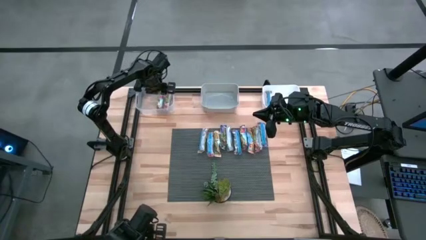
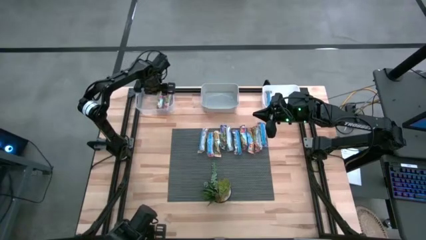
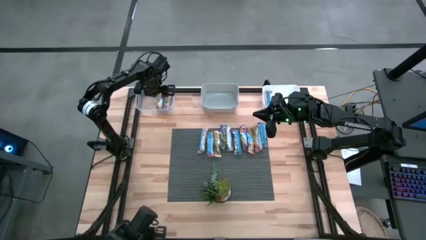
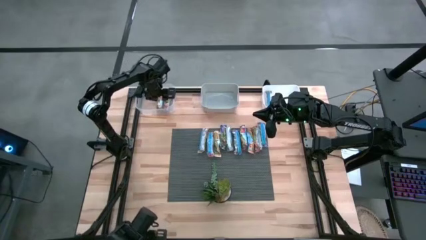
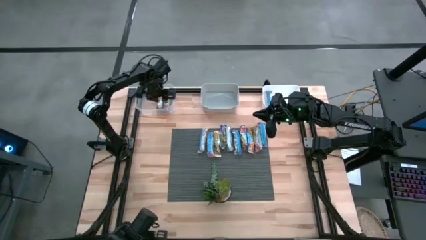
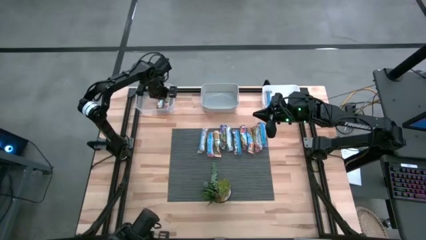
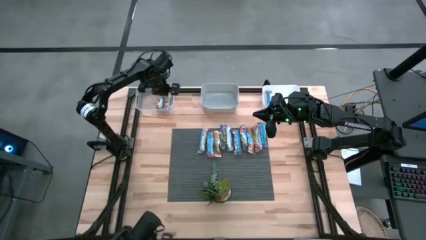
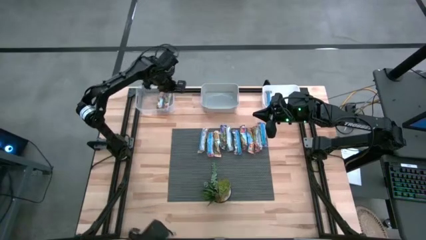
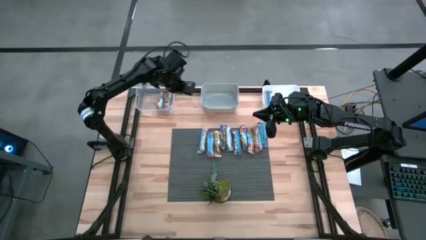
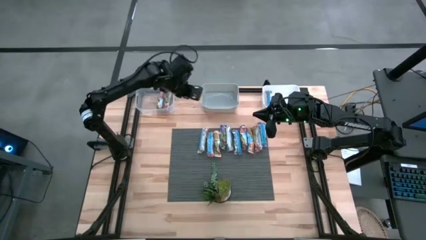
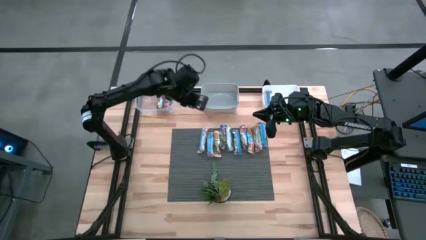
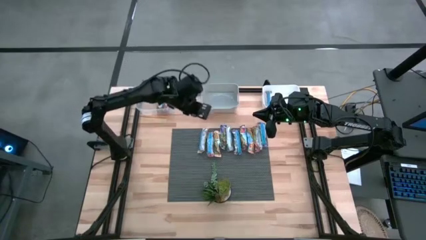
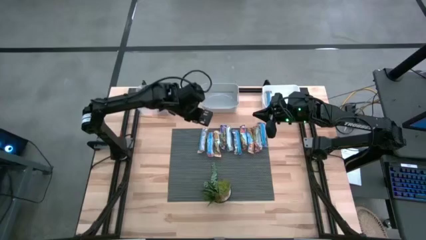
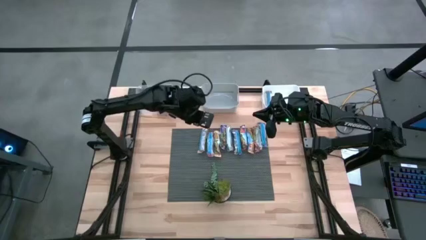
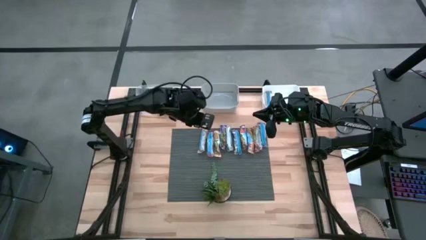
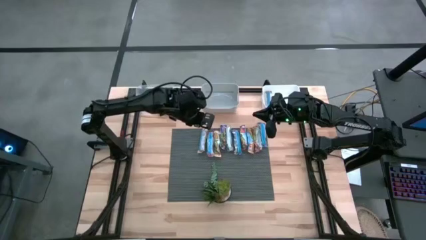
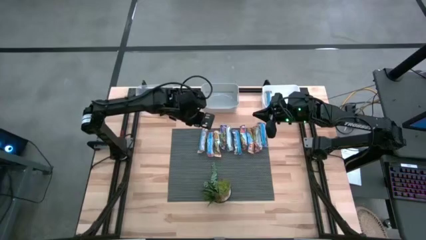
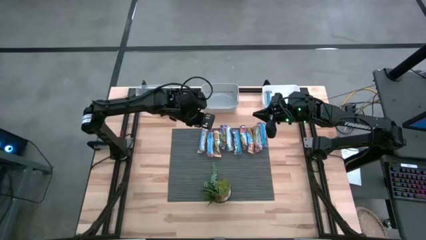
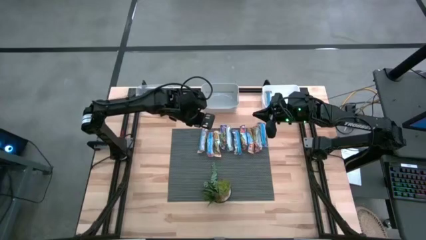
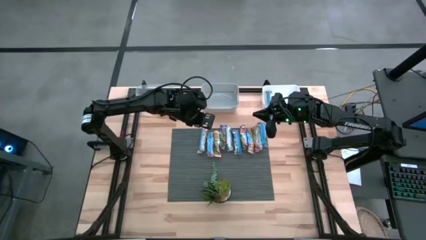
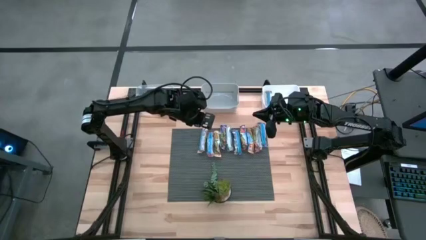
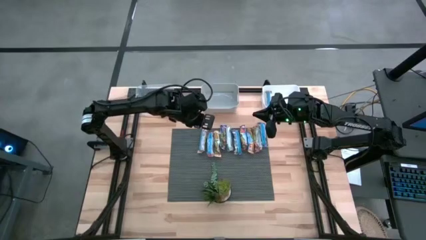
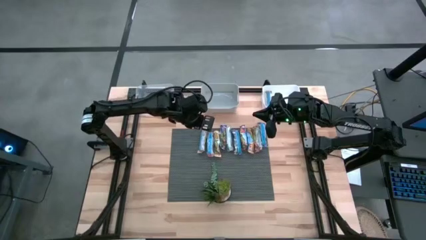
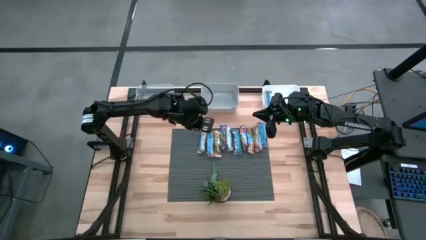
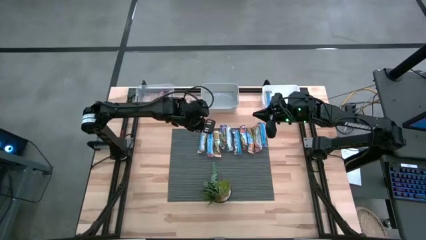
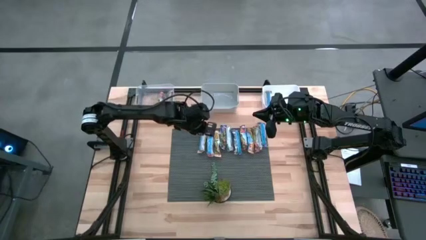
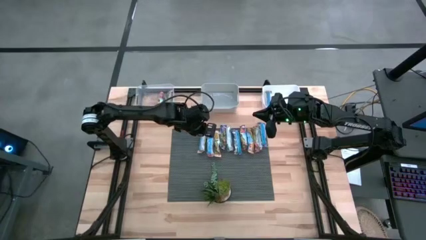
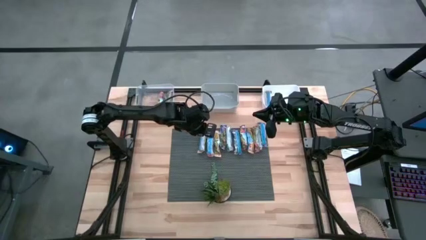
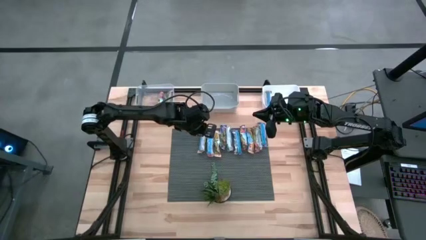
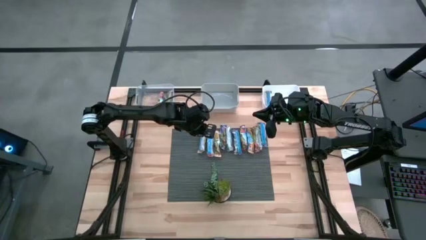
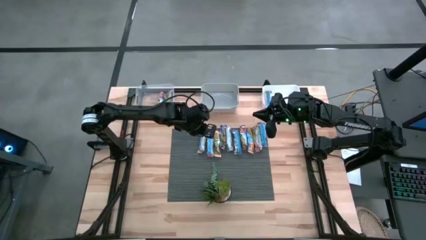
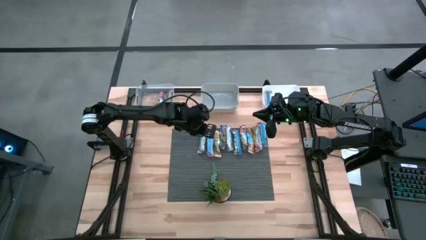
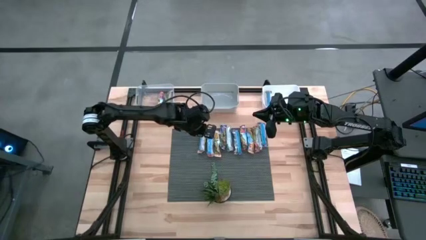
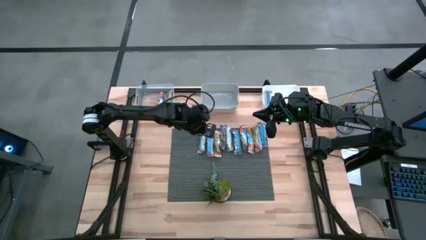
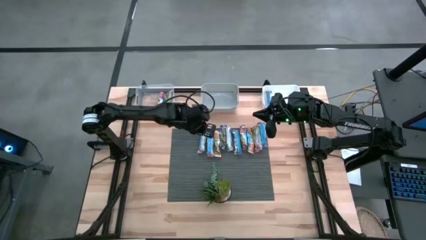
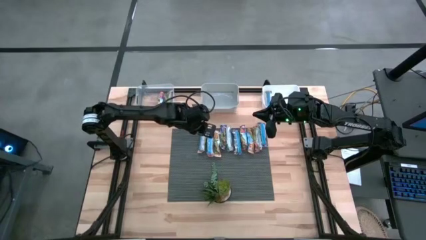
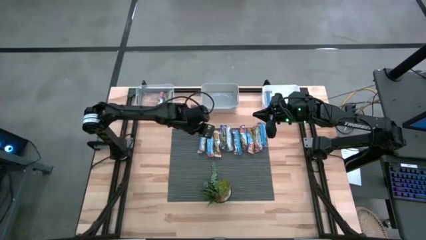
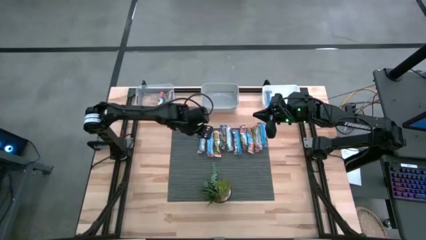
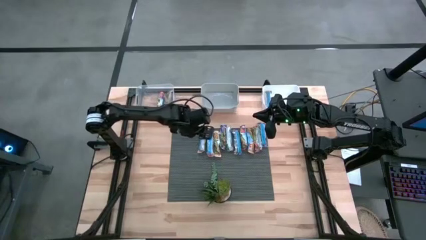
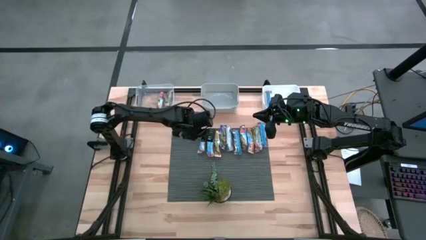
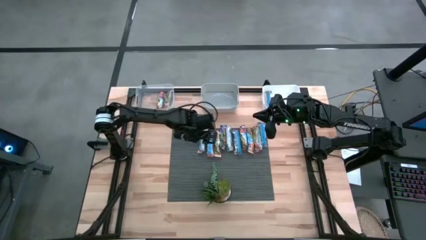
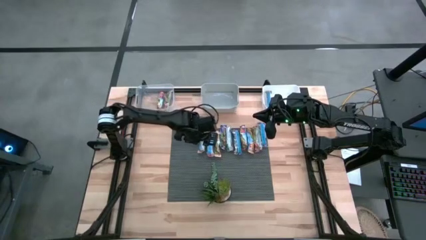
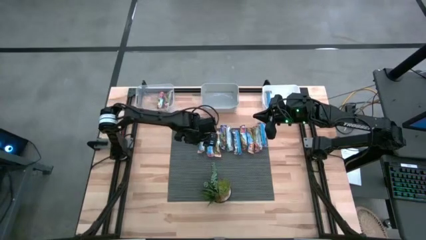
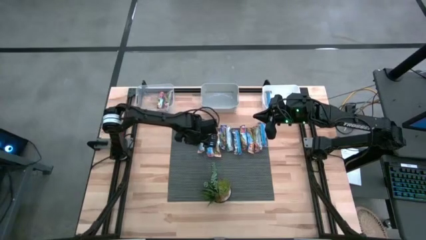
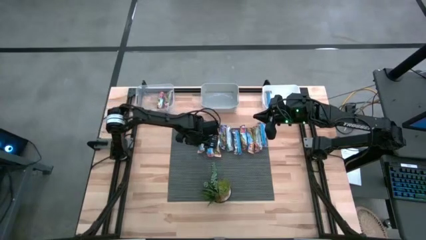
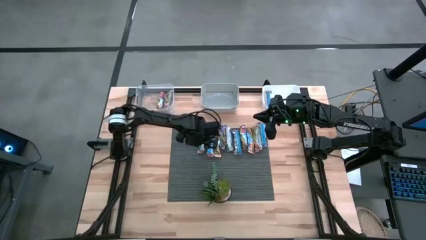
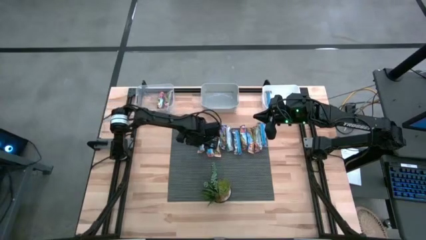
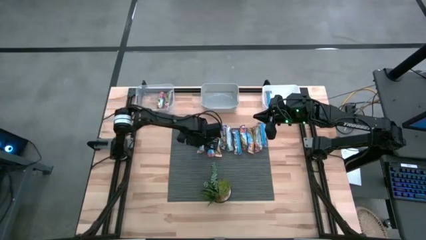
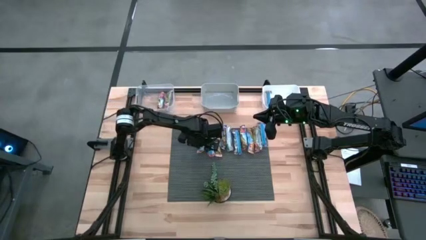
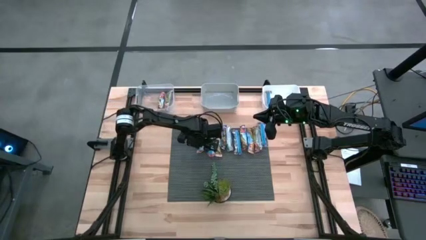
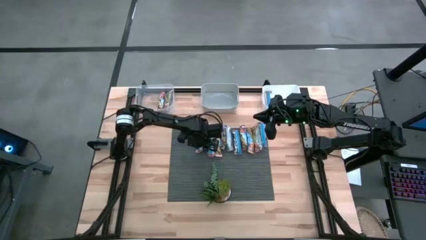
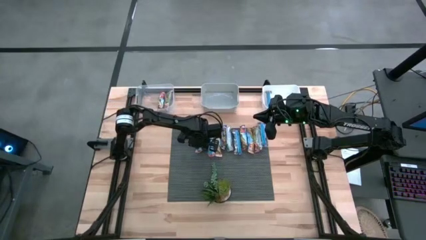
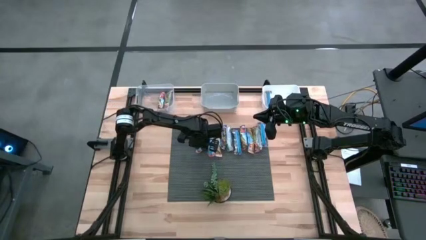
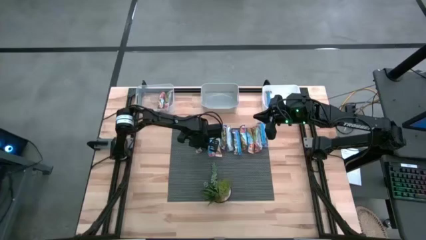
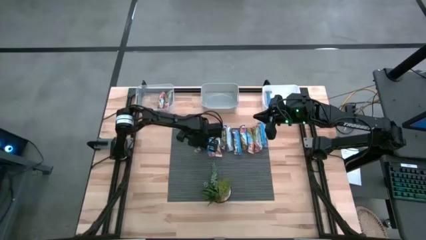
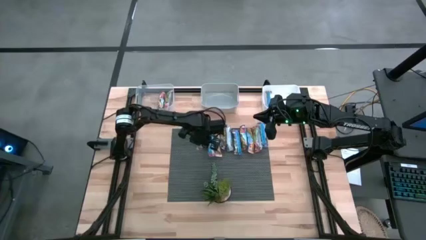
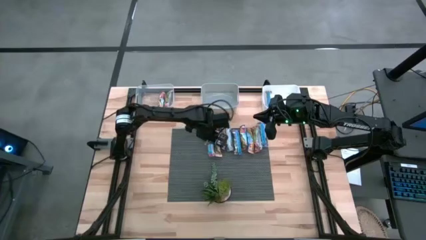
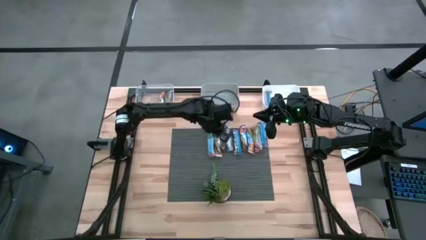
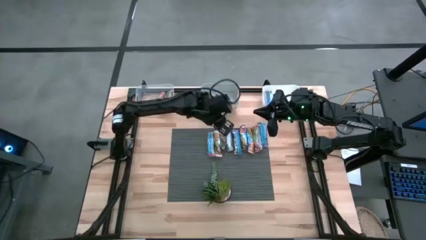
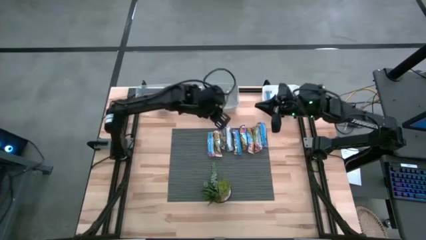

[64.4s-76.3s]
Task: Pick and place Granola Bars by type
Put the yellow granola bar into the white bin

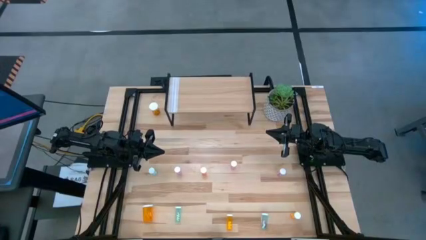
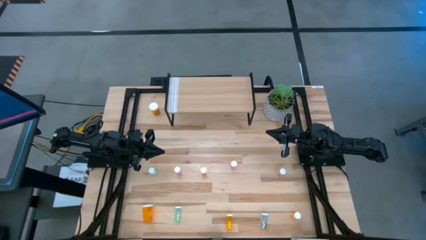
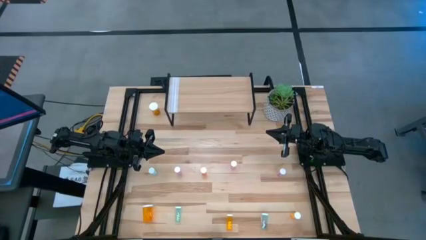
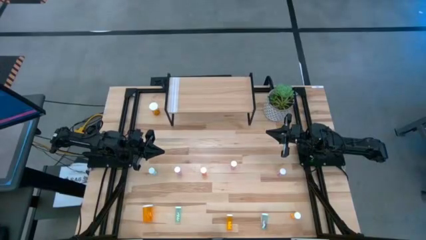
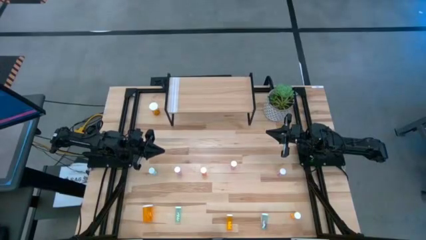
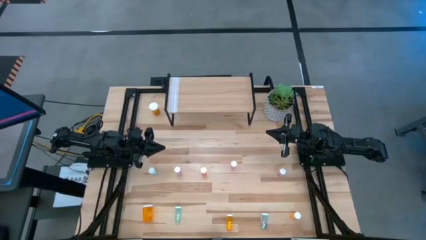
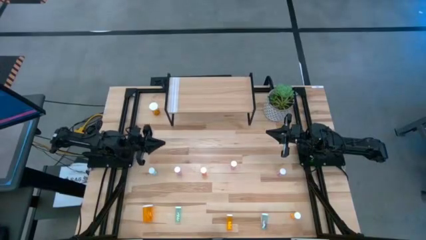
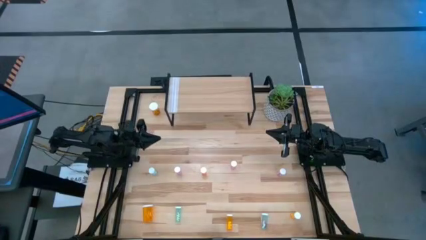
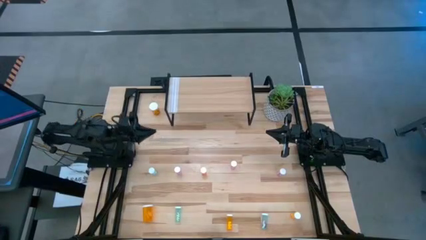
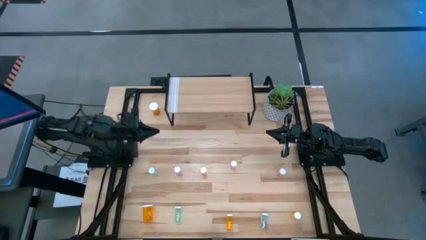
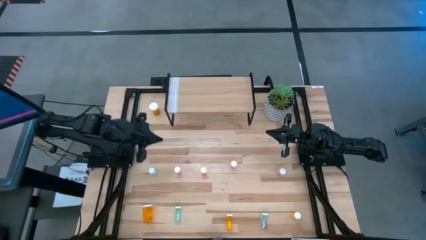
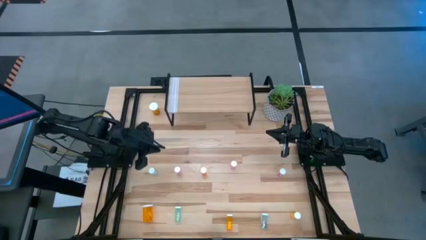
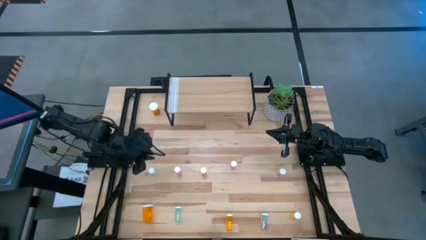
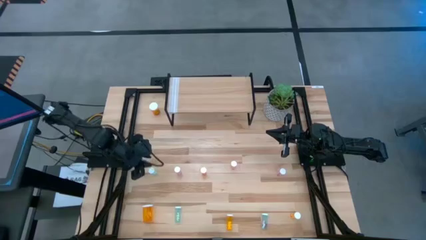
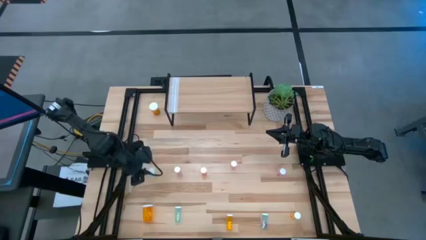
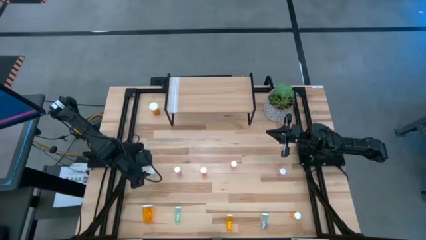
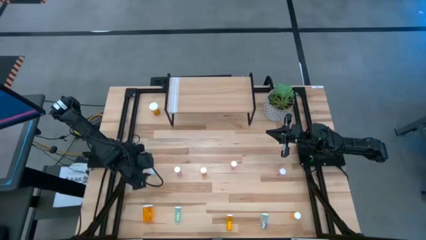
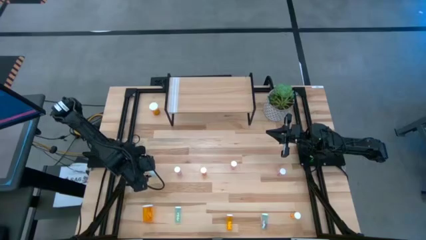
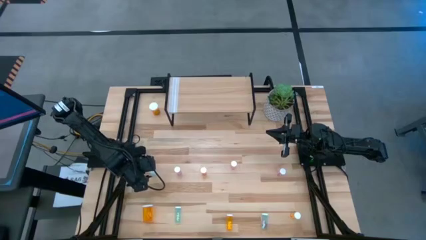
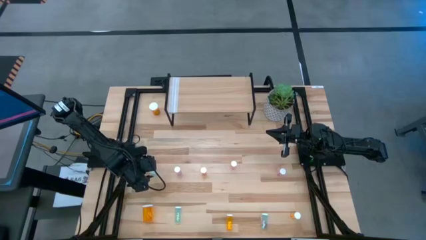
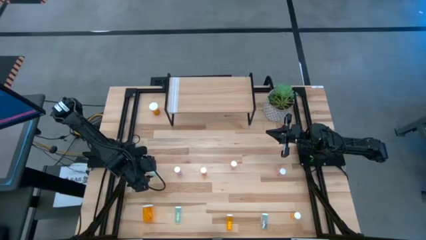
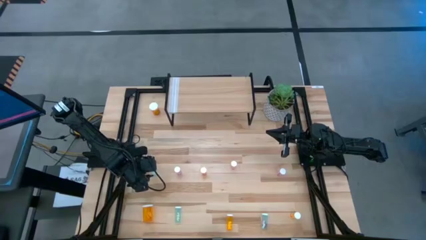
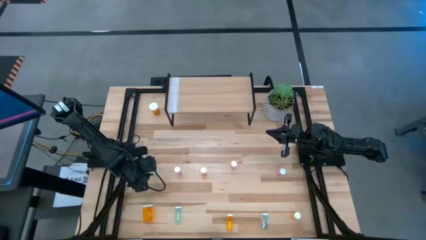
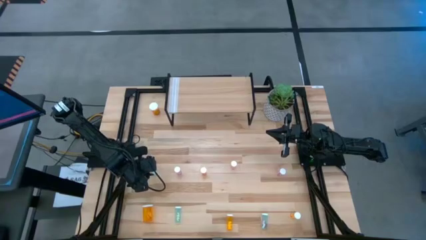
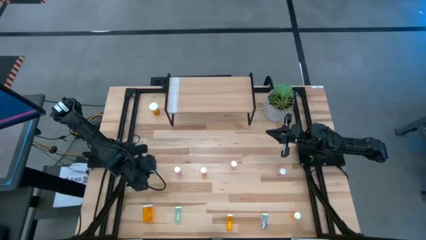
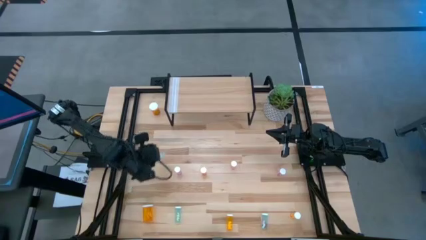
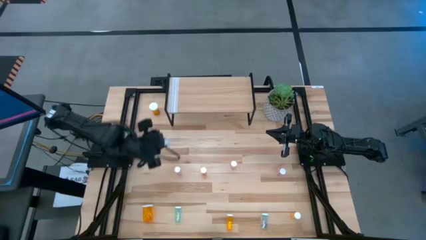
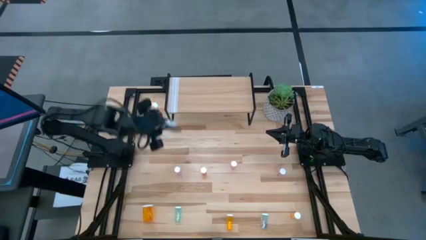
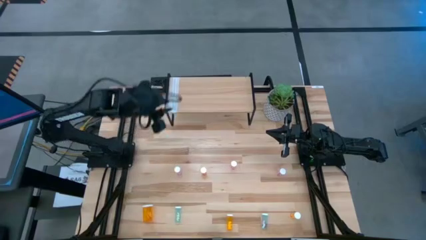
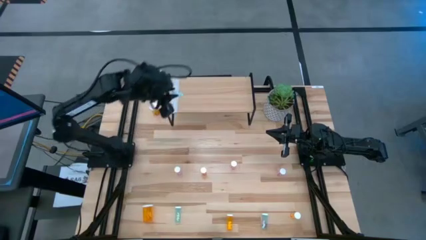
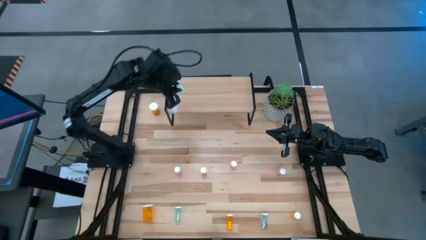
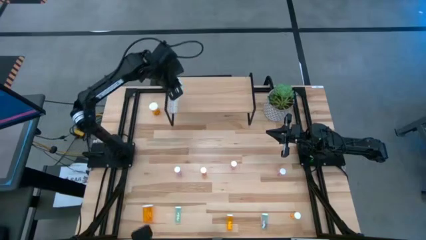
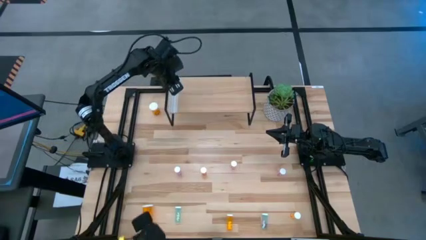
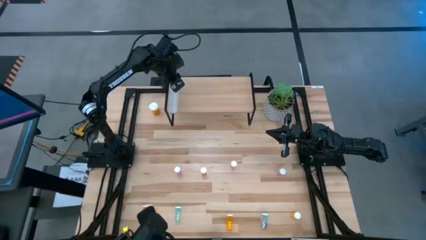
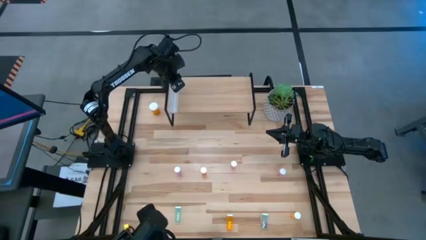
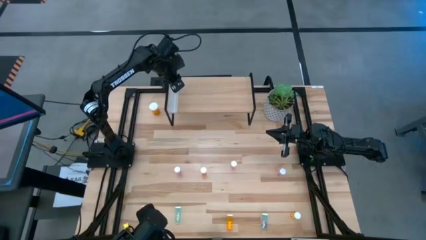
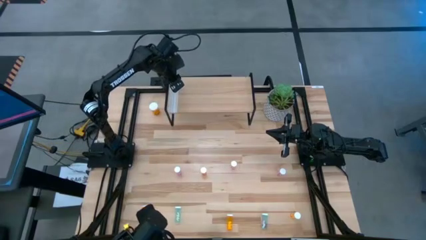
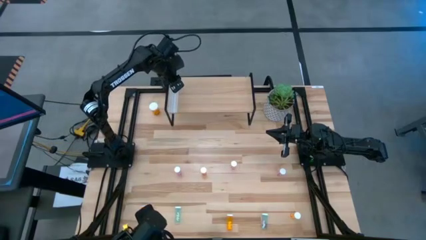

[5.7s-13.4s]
Task: Pick and place medicine bottles onto shelf by color
Put the top left blue pill bottle on the shelf
